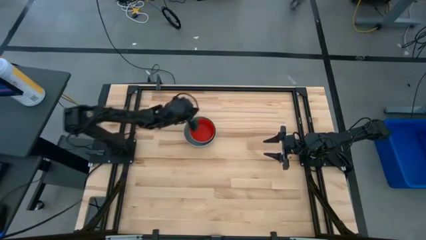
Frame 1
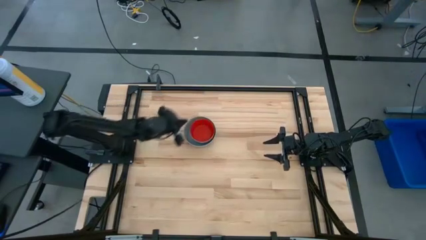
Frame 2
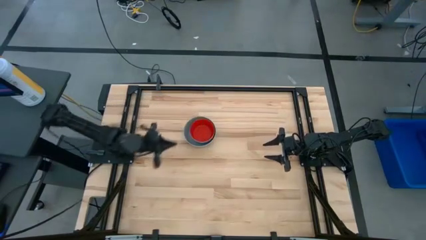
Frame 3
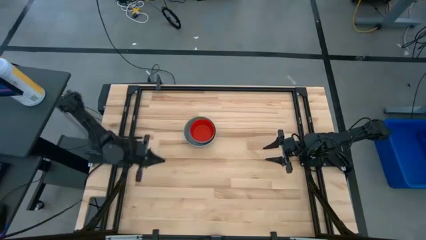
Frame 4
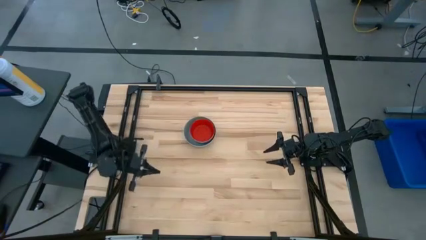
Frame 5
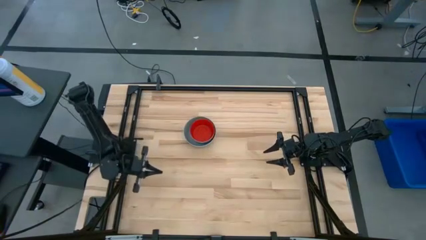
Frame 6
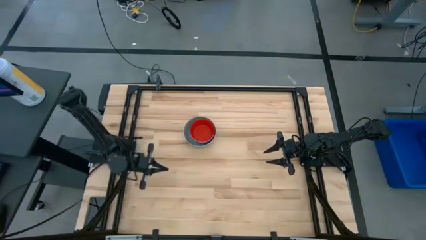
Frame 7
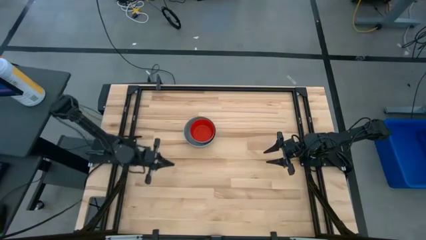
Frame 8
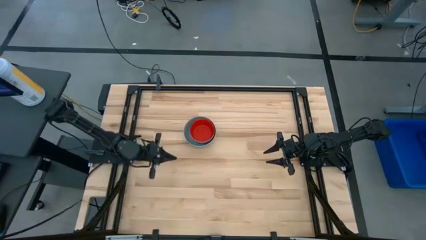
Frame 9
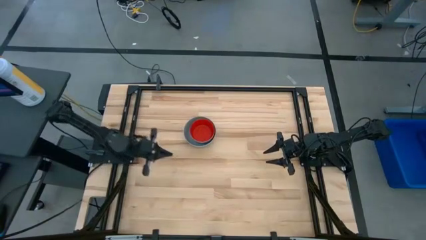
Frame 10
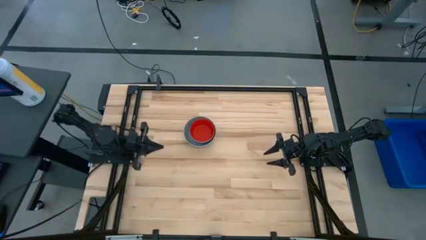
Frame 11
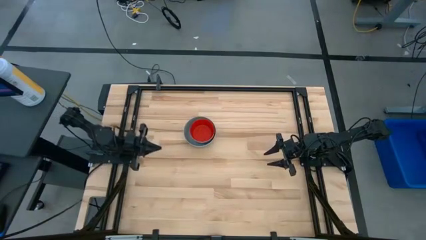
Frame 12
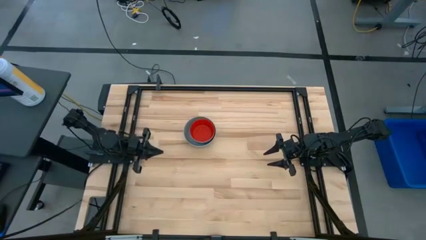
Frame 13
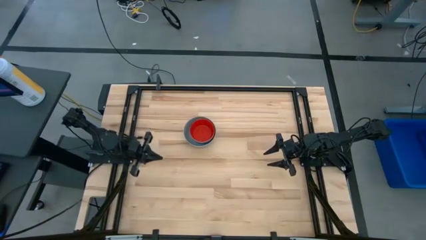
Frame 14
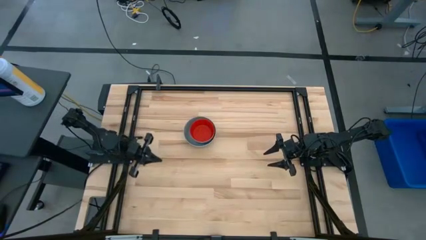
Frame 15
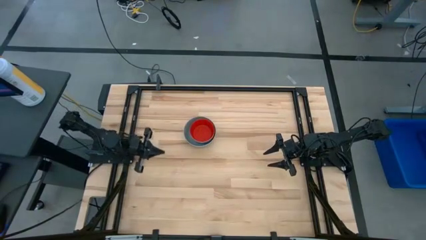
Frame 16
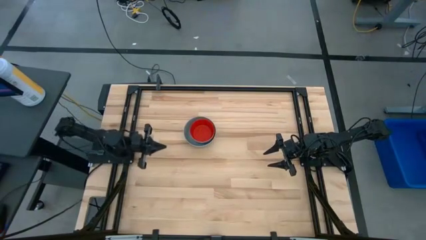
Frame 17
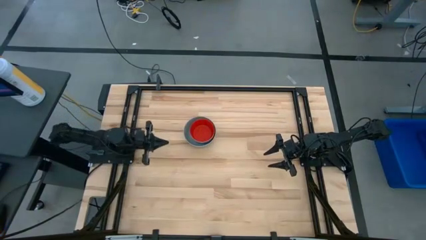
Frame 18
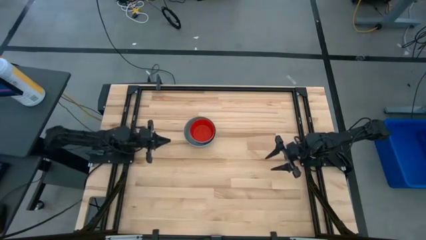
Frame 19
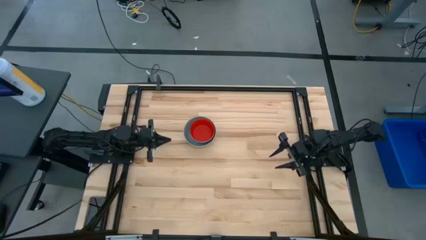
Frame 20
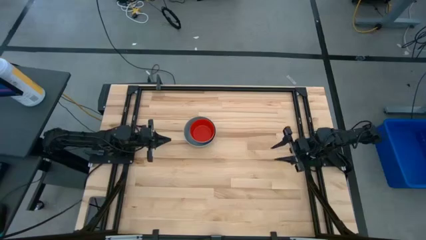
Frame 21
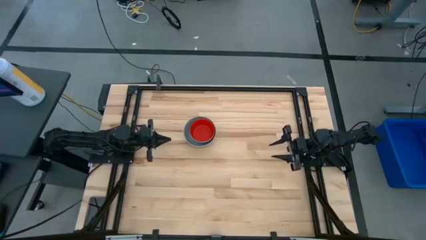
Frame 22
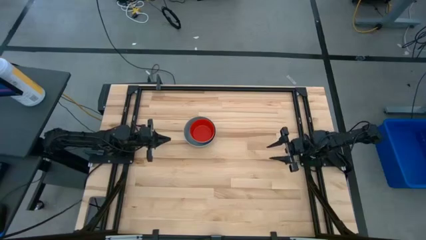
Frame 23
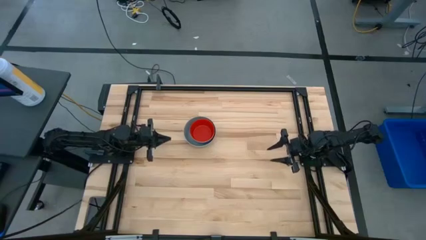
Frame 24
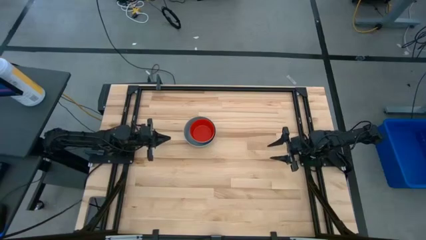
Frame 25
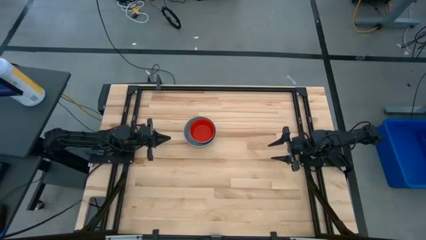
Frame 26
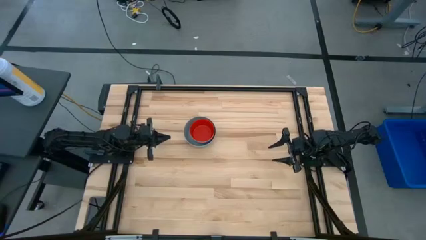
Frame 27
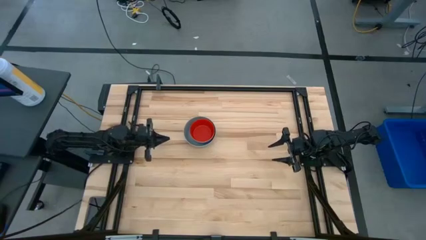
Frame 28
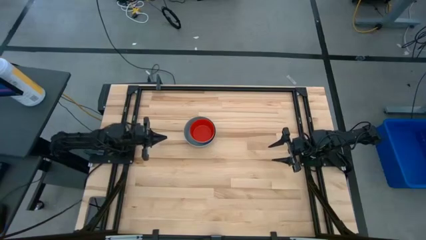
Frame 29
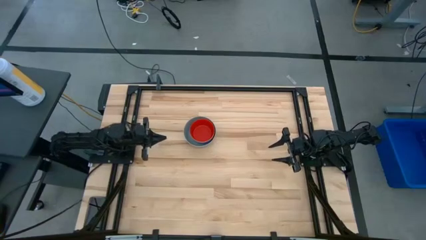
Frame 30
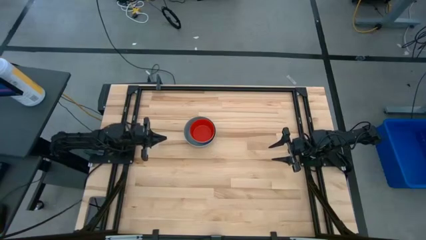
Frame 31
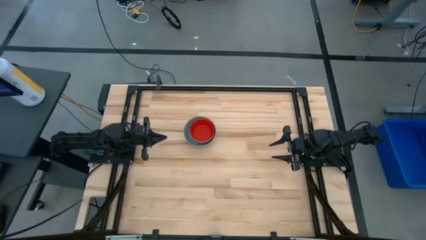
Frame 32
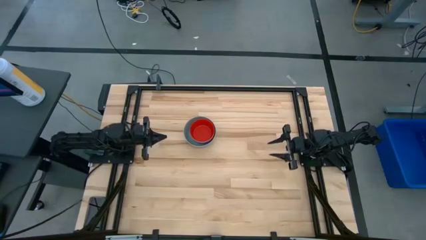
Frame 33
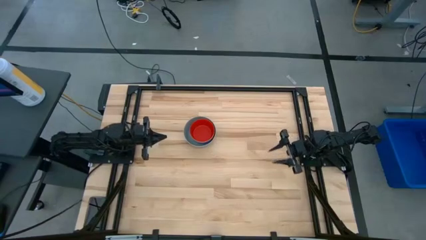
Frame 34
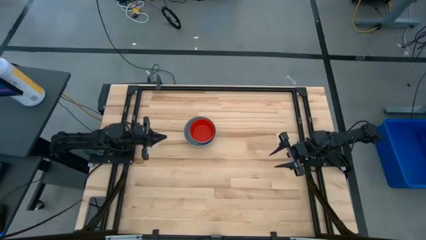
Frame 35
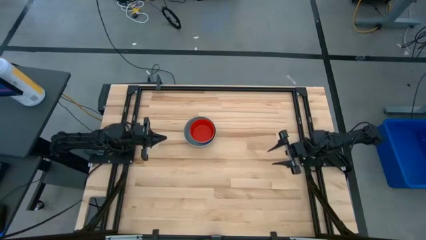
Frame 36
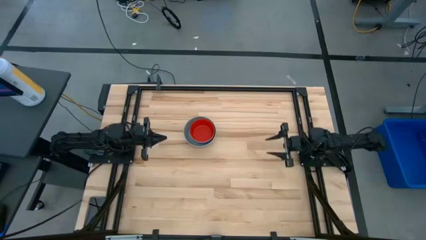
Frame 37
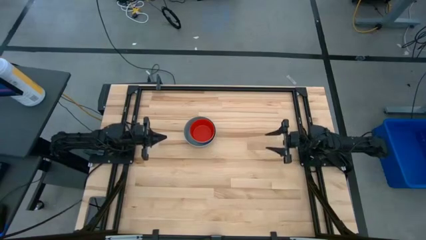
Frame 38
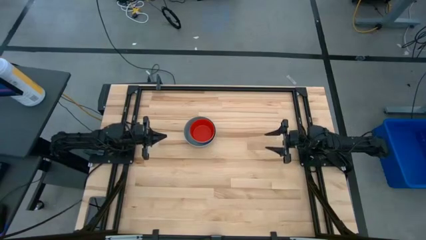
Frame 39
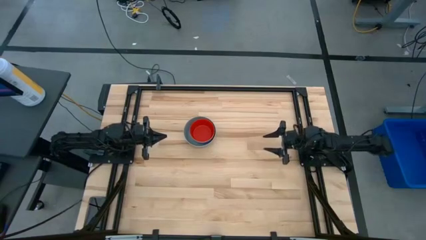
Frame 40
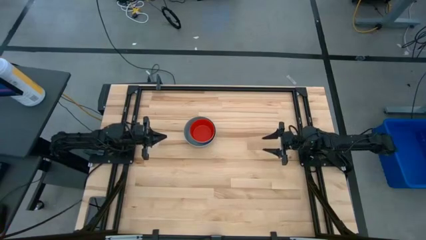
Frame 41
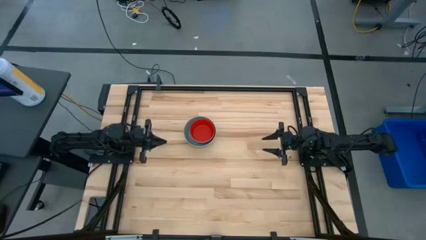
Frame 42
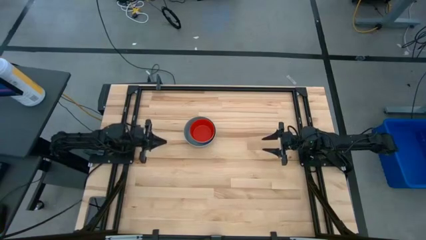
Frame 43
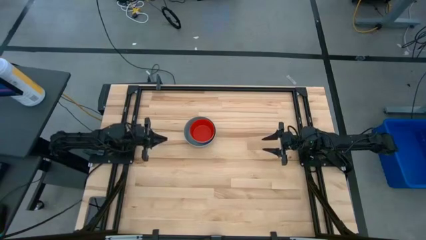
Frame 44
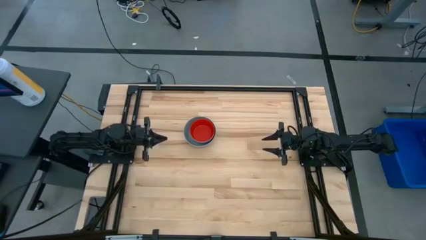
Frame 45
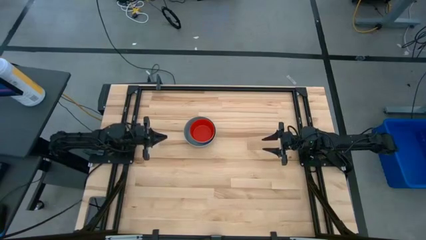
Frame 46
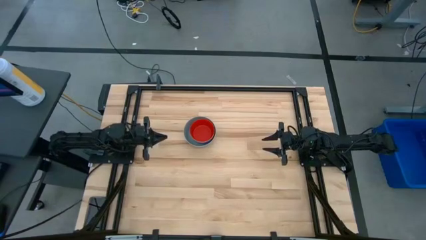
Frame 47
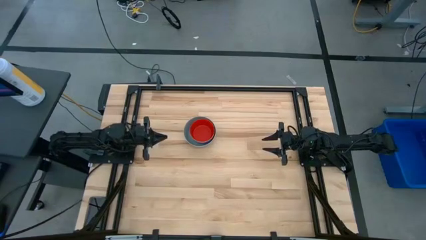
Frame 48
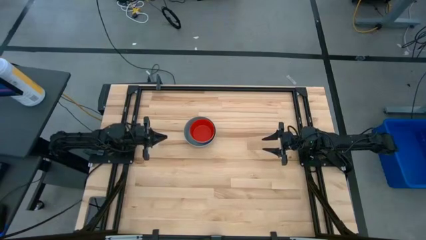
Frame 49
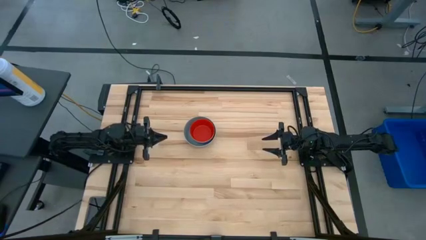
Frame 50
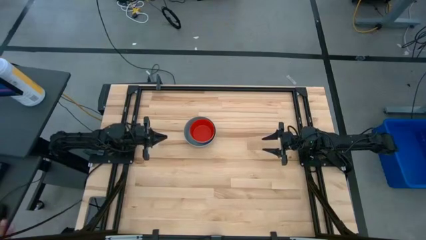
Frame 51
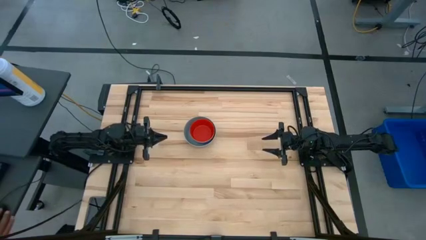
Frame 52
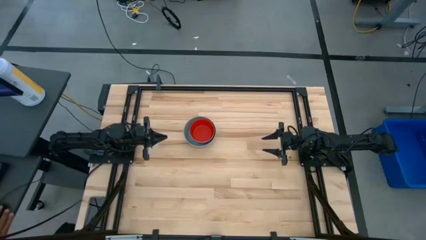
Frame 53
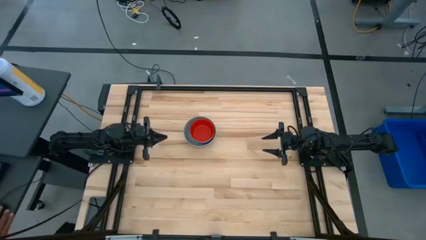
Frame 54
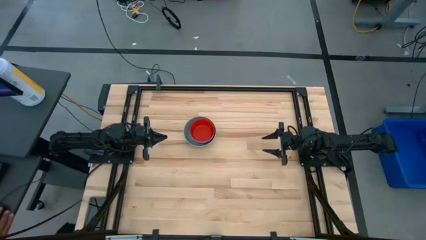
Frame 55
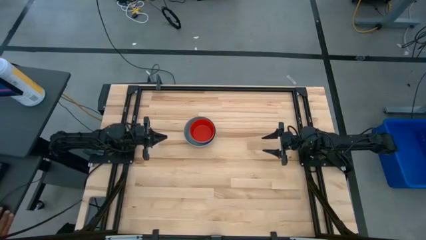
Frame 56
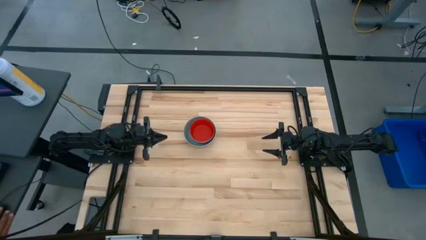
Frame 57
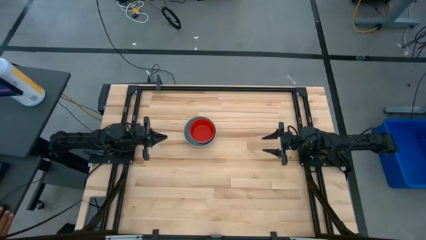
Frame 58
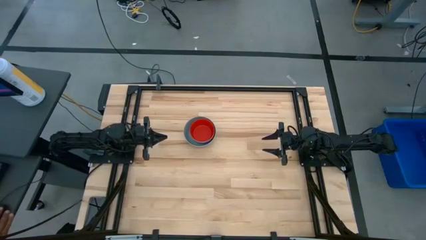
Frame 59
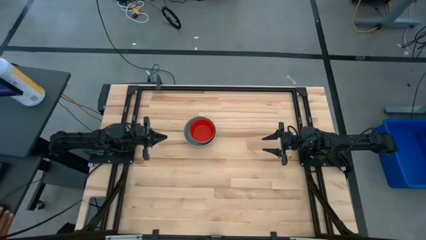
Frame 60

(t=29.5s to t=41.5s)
Return to Home Position
